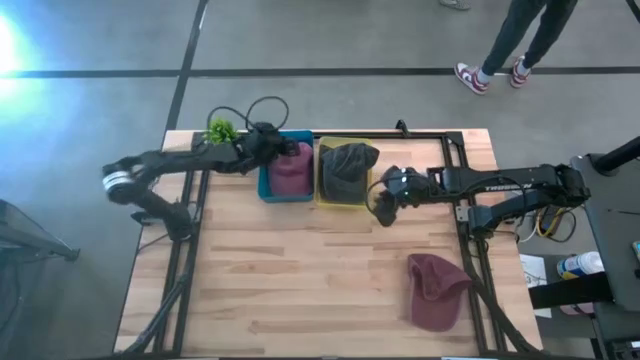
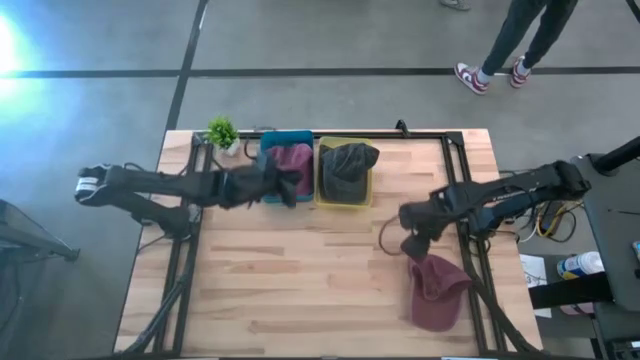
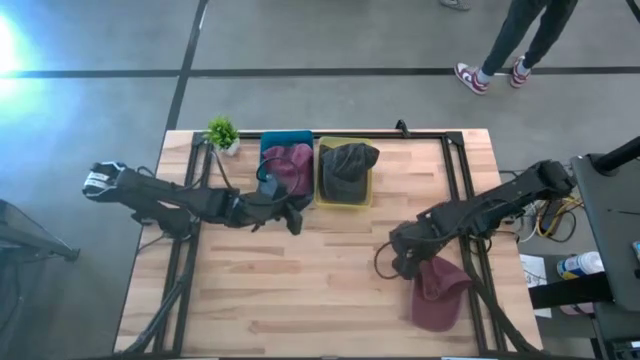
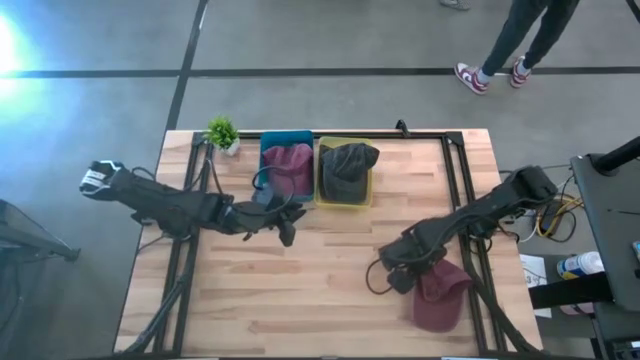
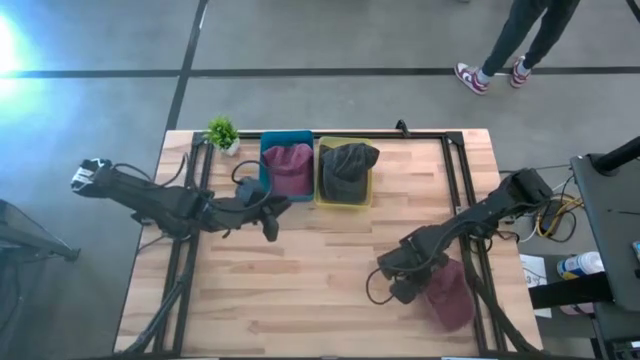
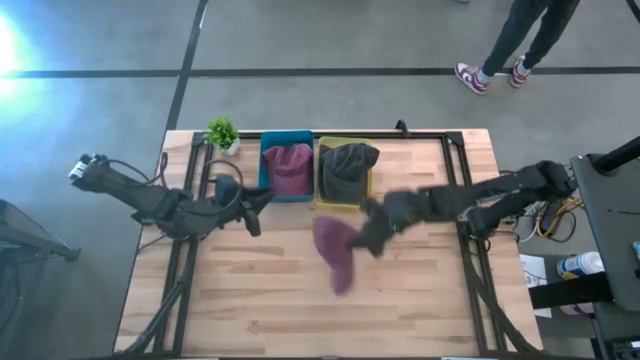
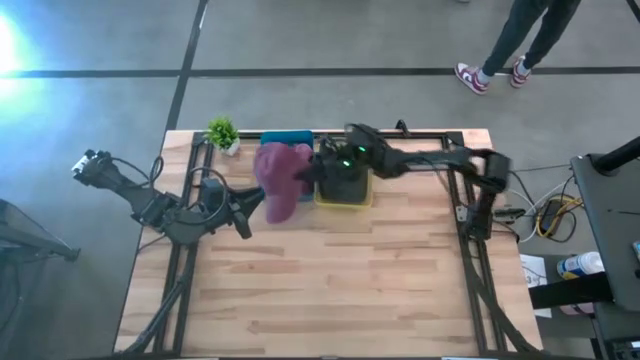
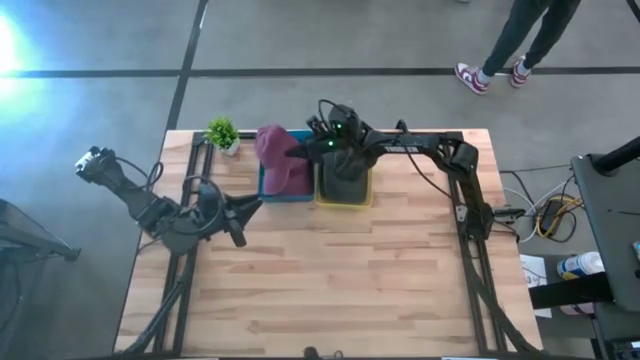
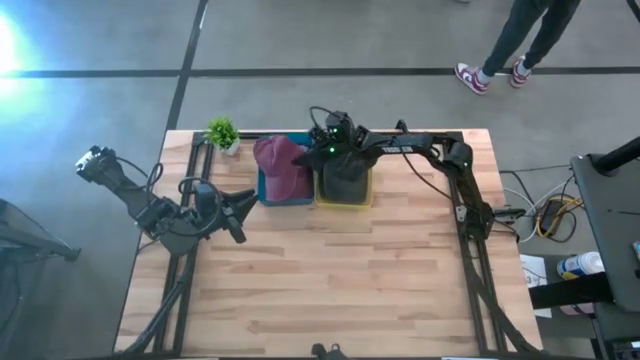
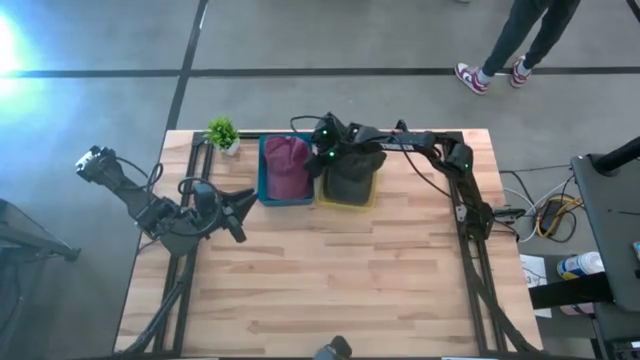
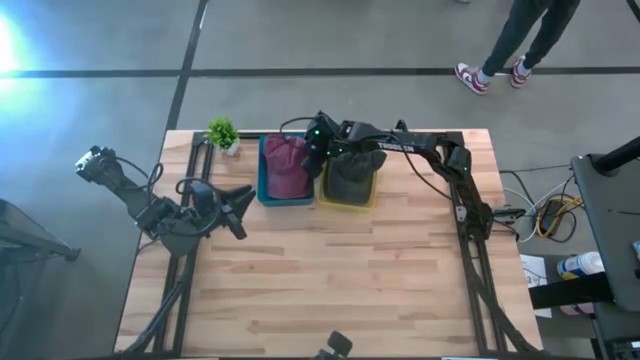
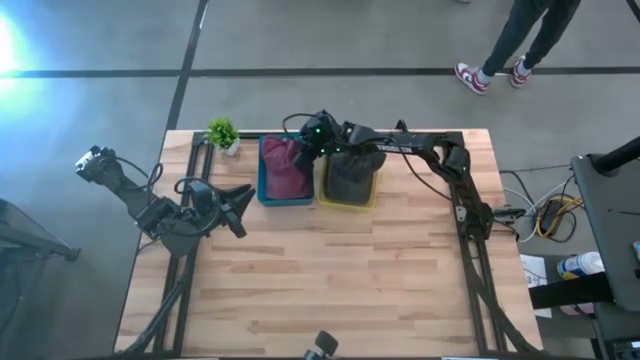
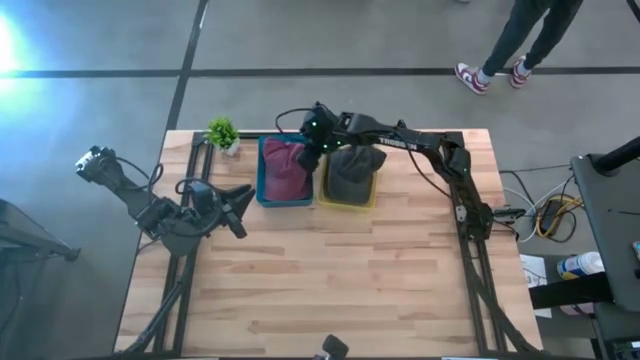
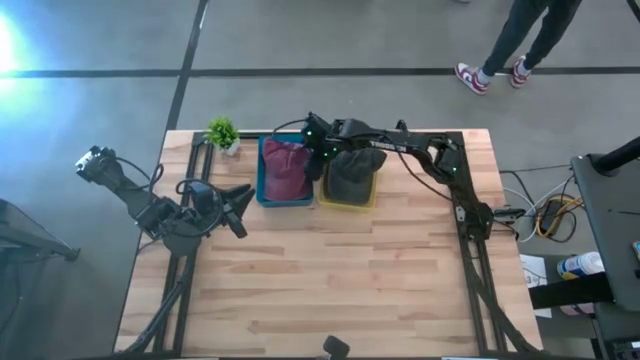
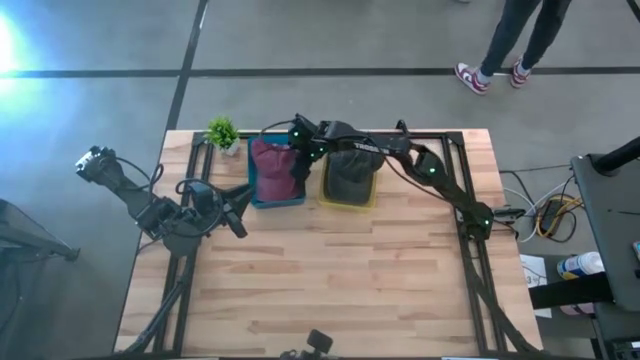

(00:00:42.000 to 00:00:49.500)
Task: Pick & Place hat
Put the red cap into the blue bin

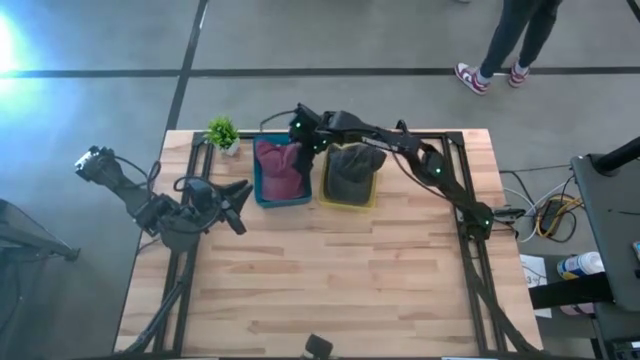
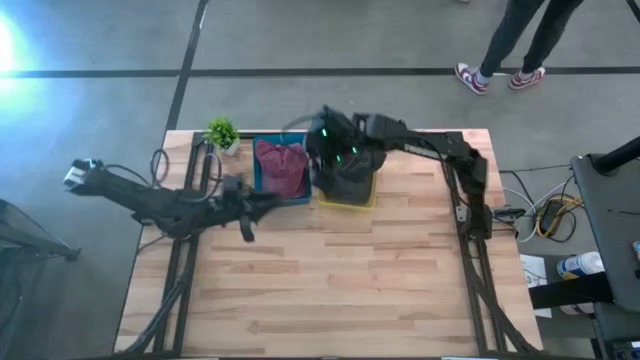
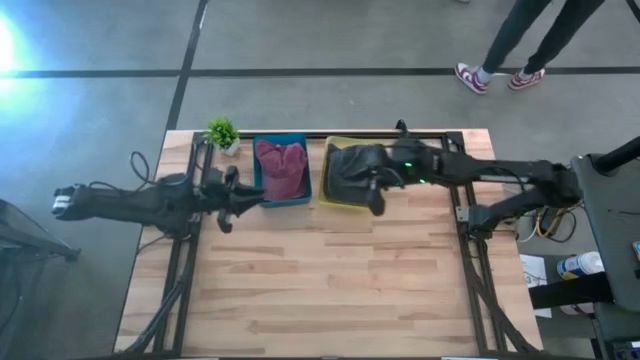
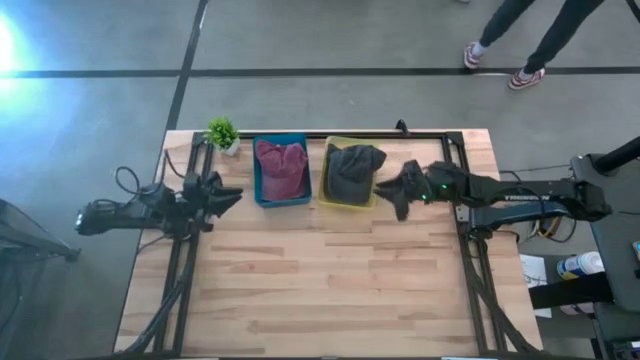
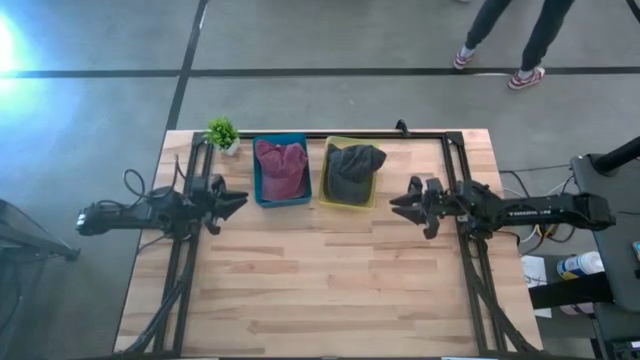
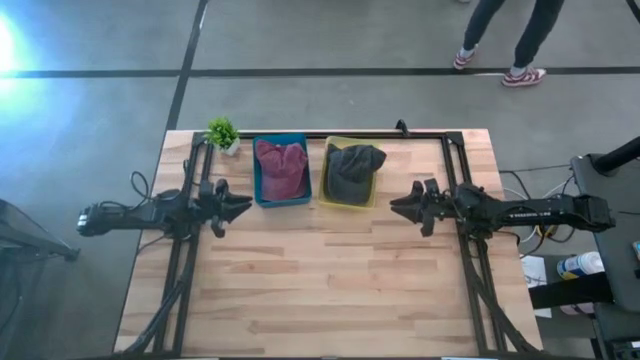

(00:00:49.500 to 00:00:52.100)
Return to Home Position

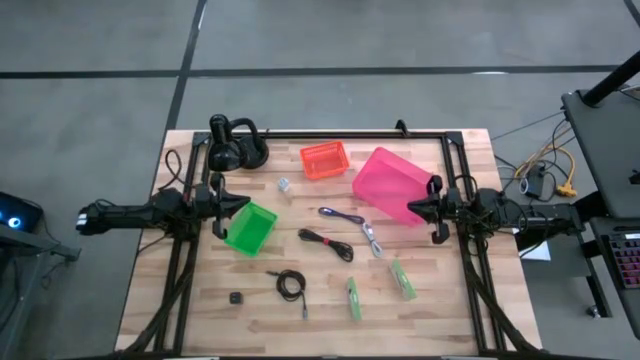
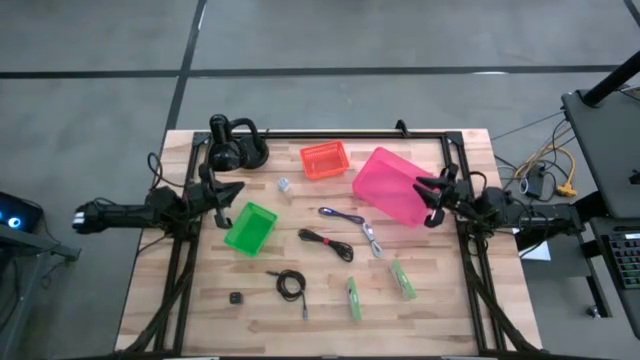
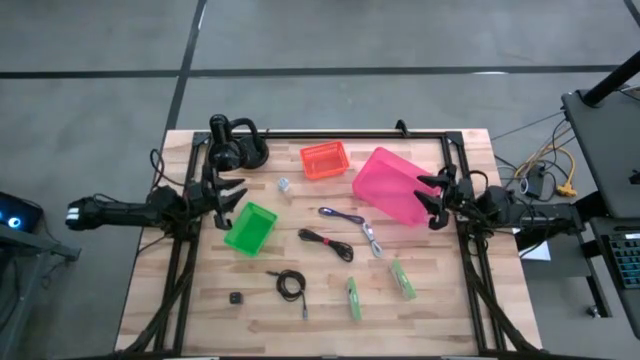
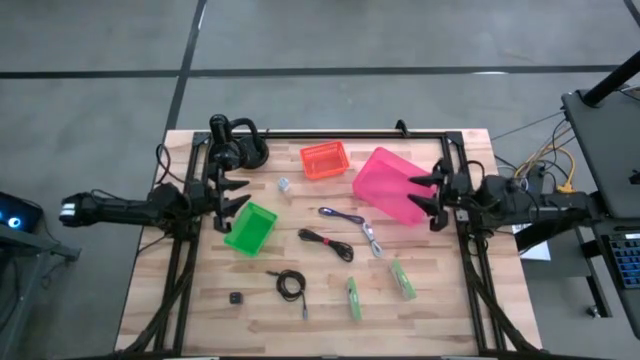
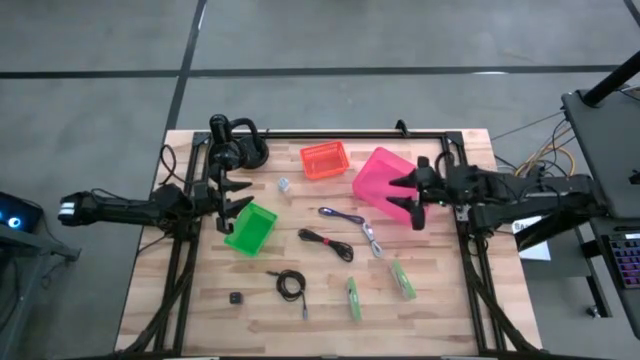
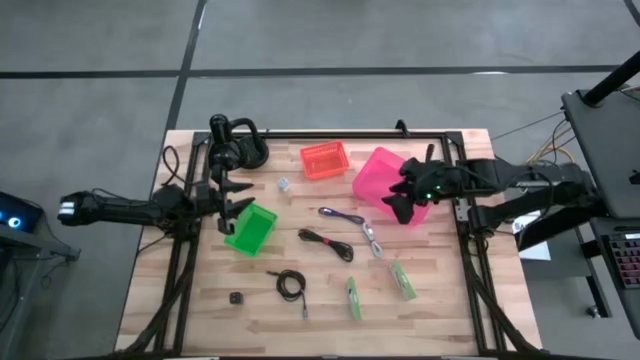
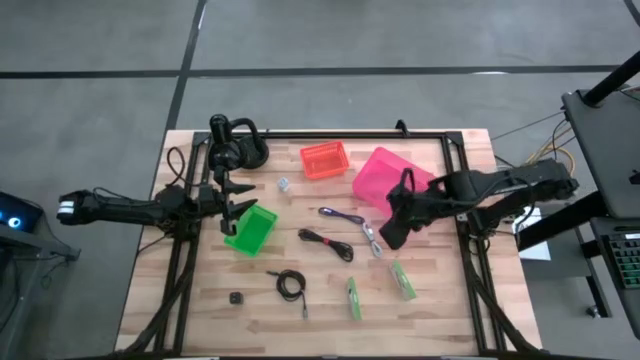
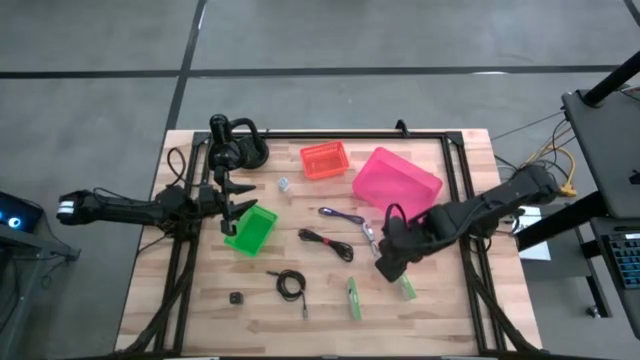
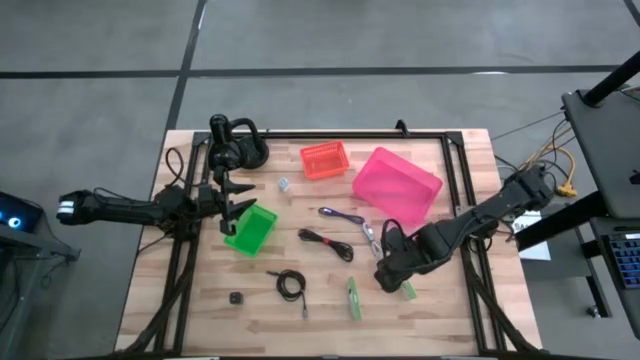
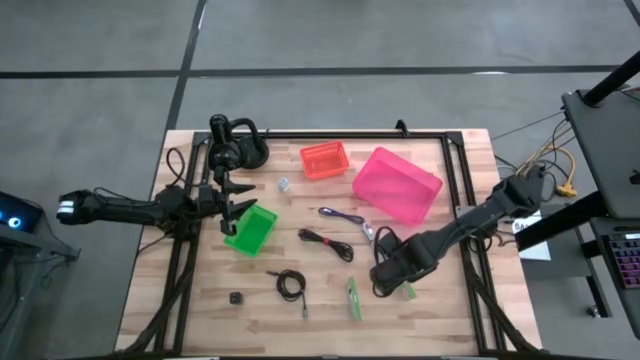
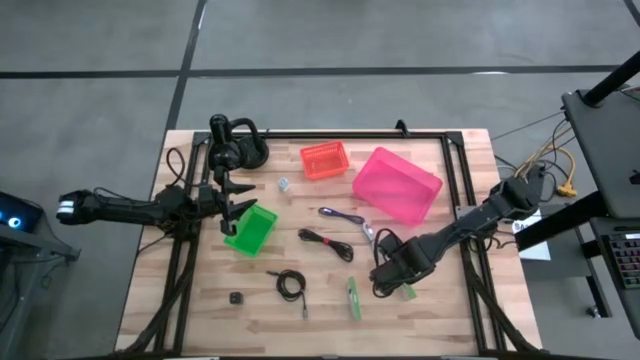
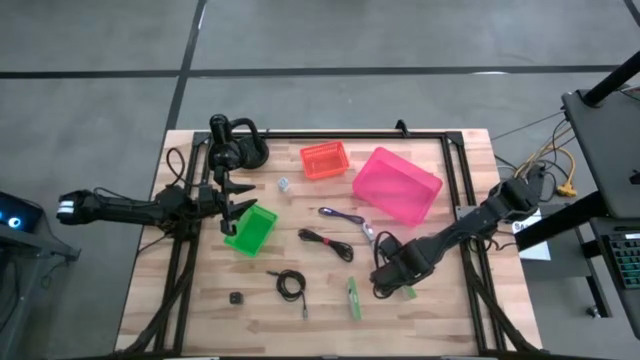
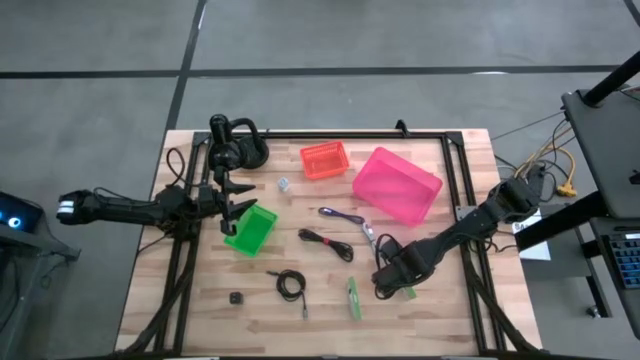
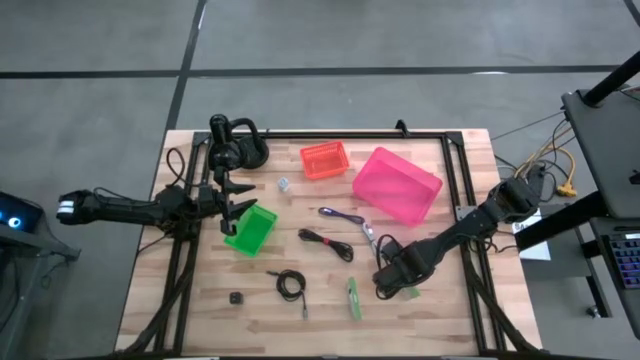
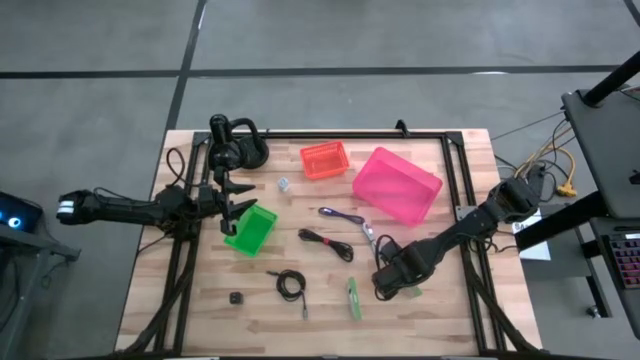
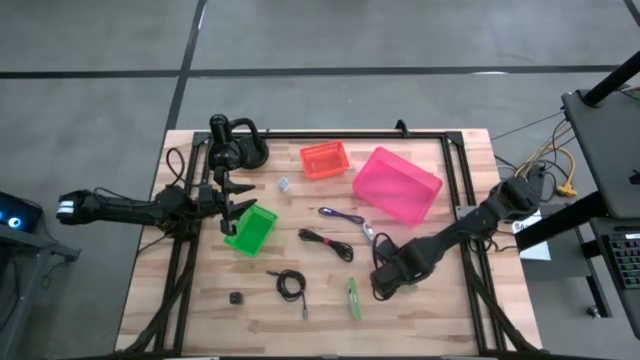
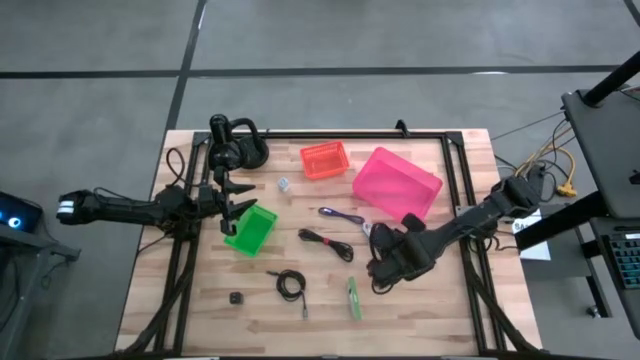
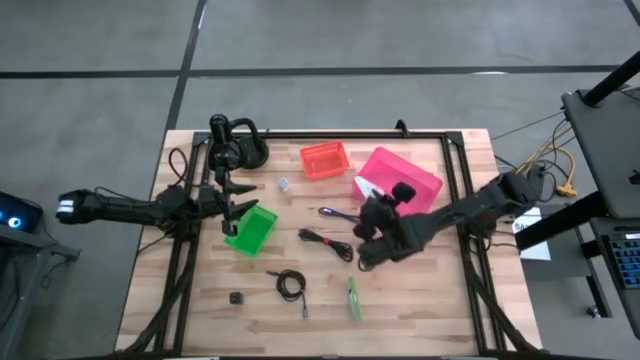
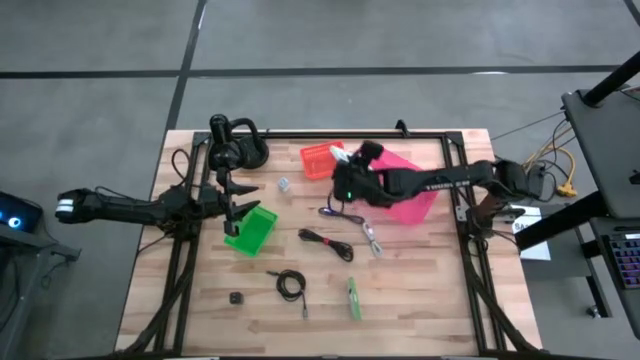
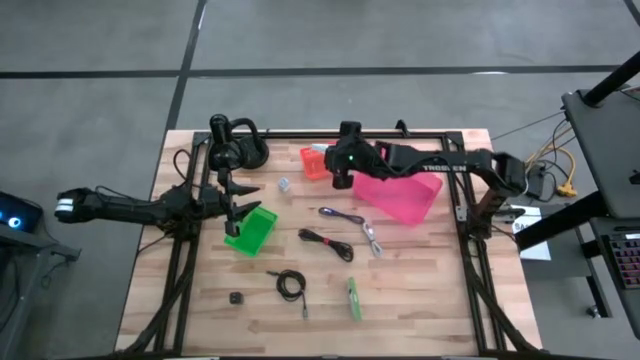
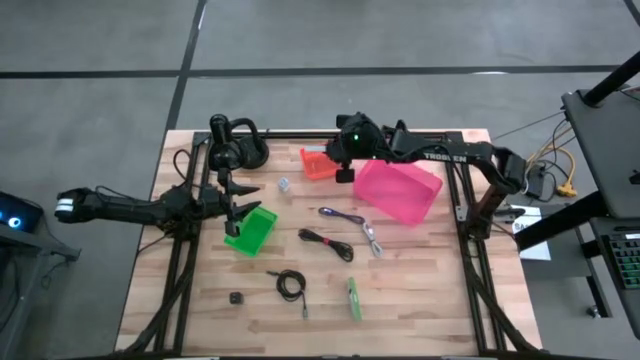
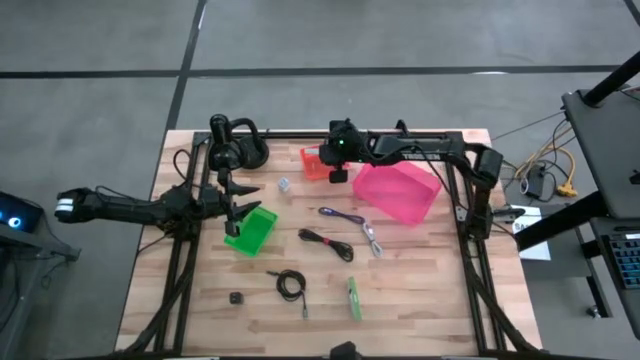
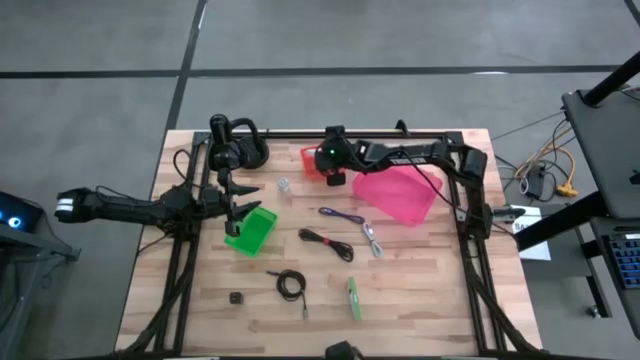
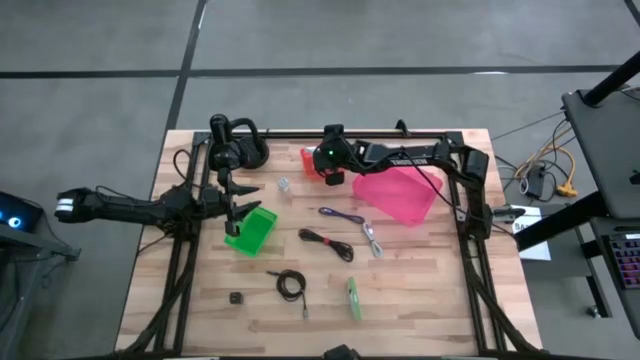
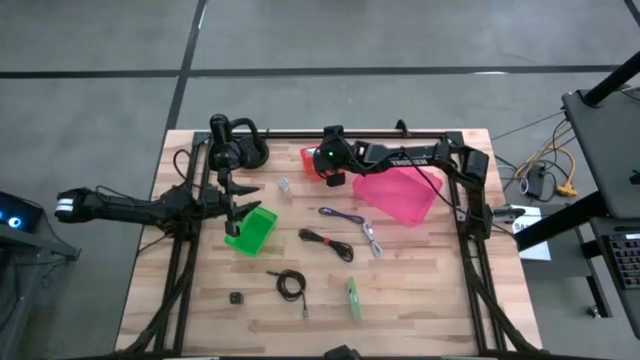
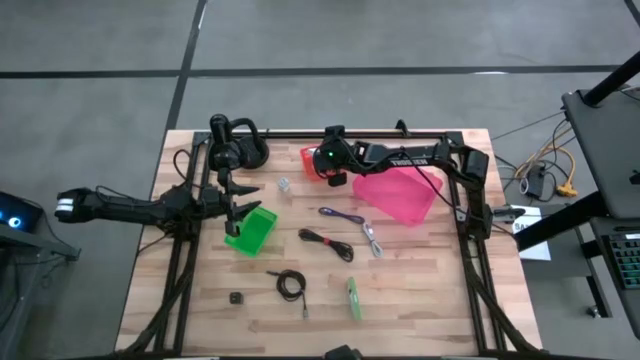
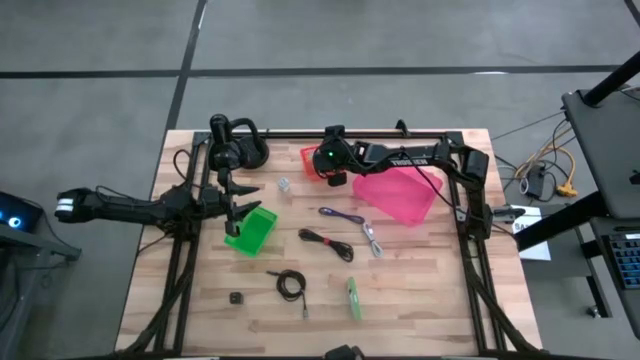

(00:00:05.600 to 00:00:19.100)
Task: Pick and place items into bin
Put the right white card reader box into the orange basket
